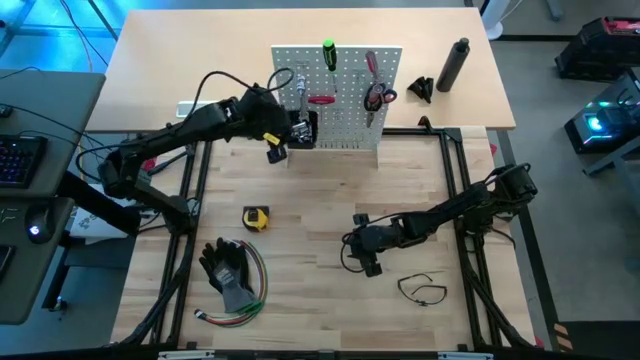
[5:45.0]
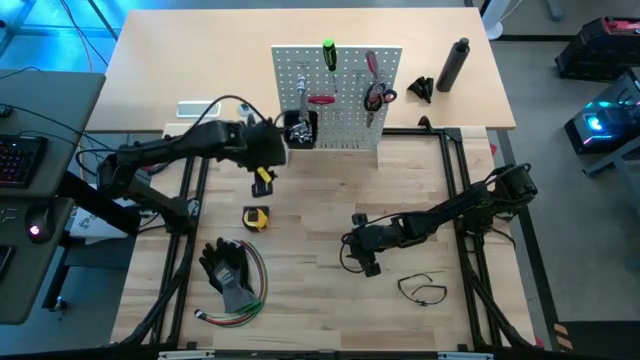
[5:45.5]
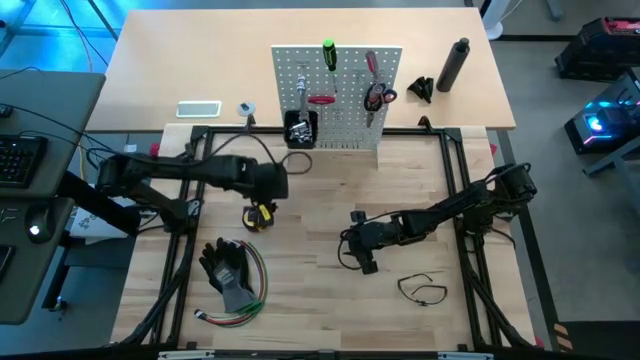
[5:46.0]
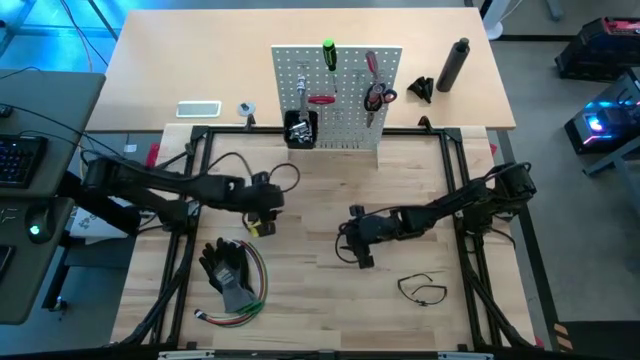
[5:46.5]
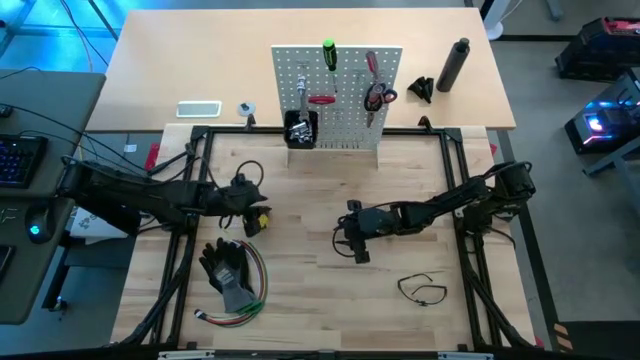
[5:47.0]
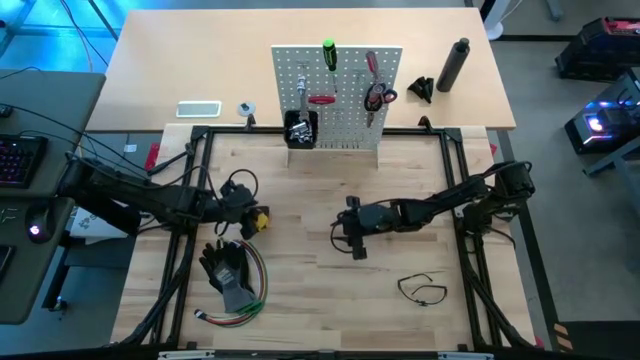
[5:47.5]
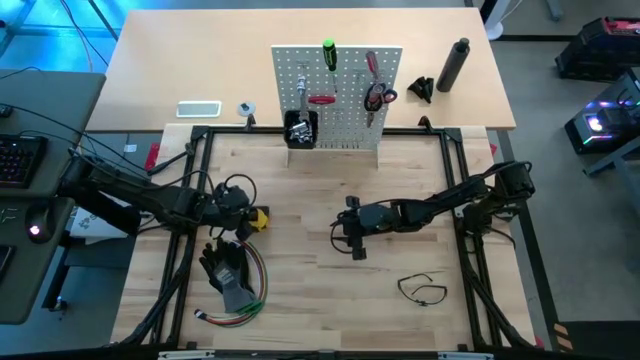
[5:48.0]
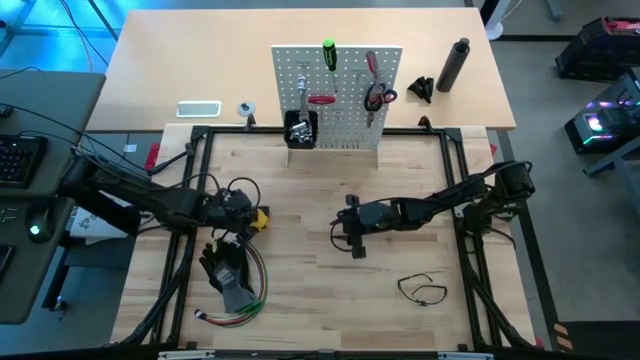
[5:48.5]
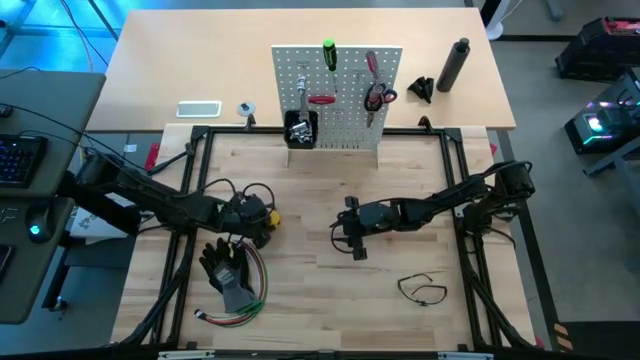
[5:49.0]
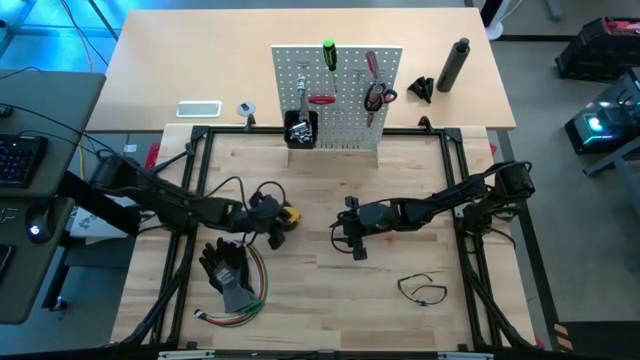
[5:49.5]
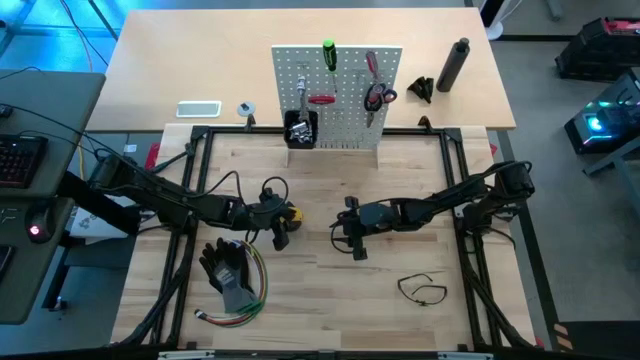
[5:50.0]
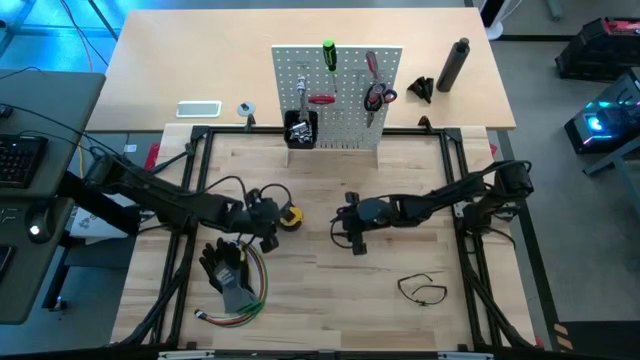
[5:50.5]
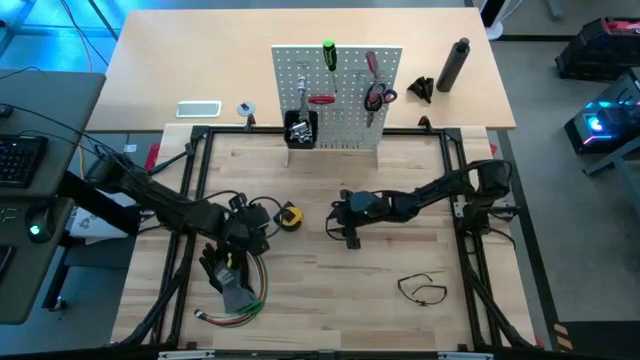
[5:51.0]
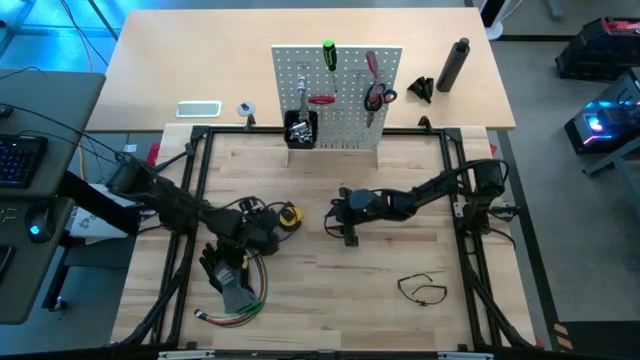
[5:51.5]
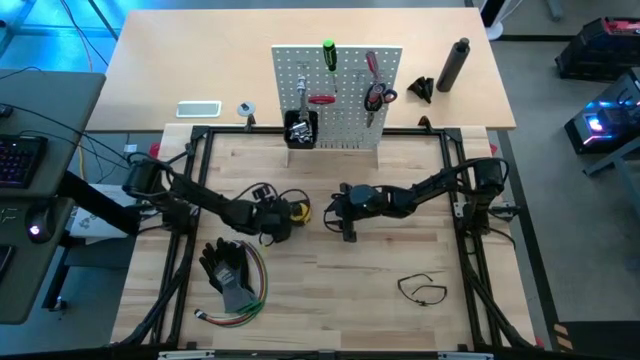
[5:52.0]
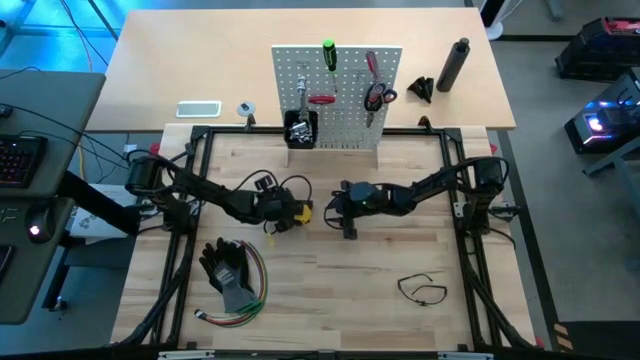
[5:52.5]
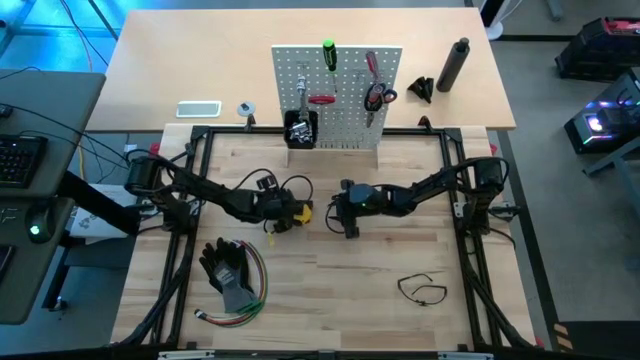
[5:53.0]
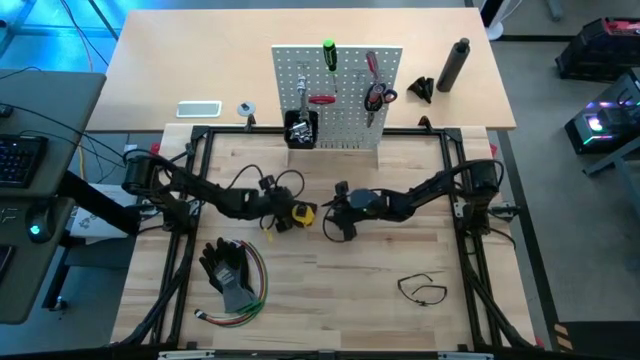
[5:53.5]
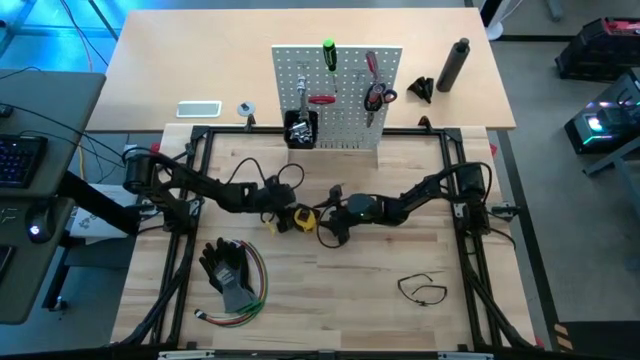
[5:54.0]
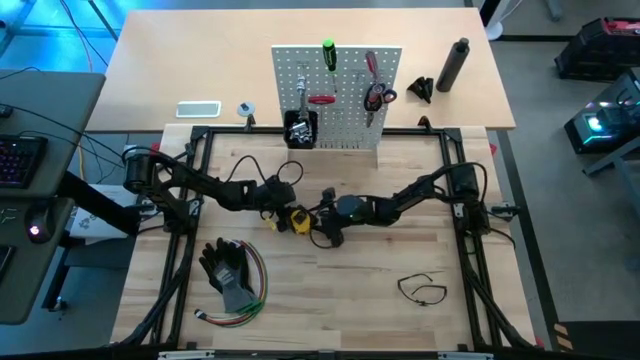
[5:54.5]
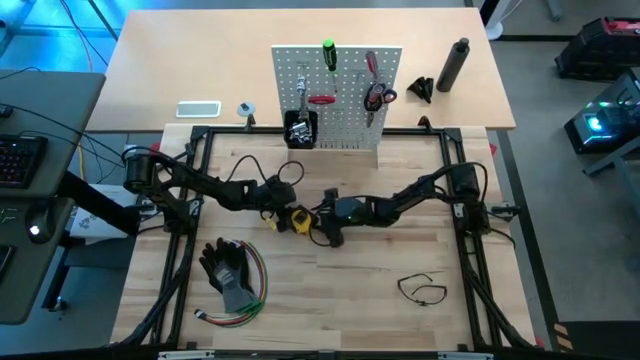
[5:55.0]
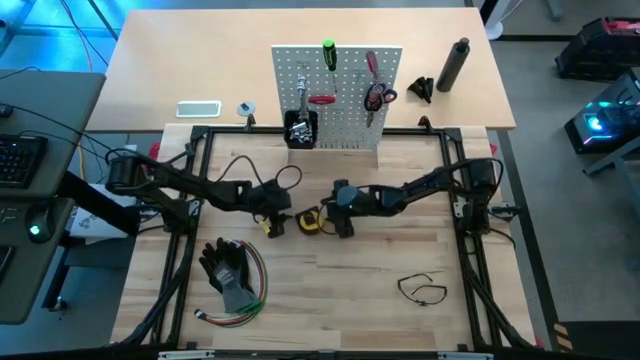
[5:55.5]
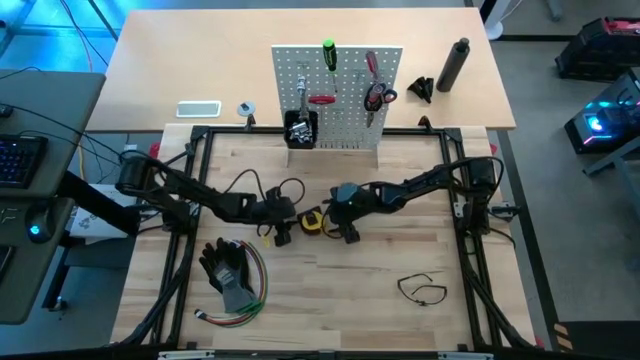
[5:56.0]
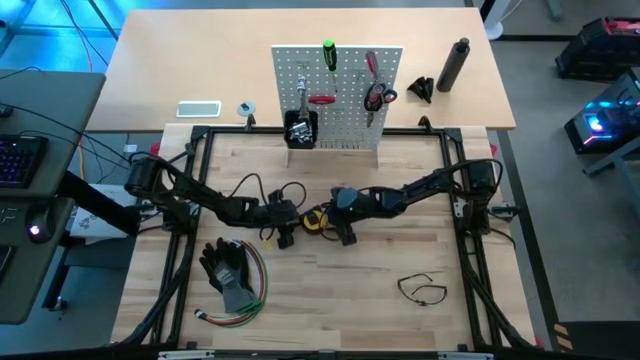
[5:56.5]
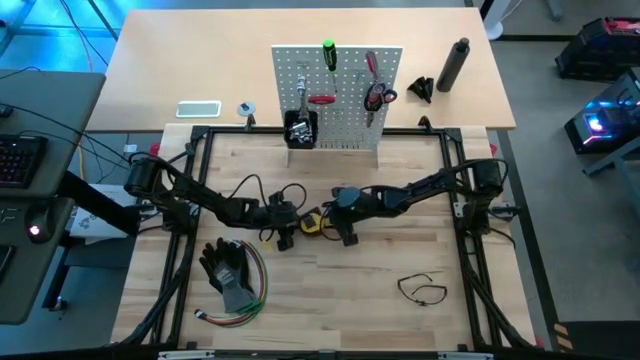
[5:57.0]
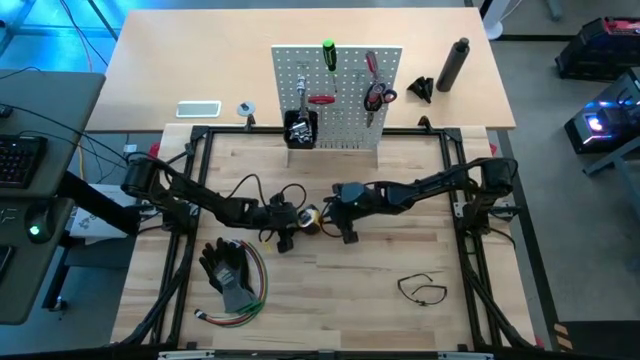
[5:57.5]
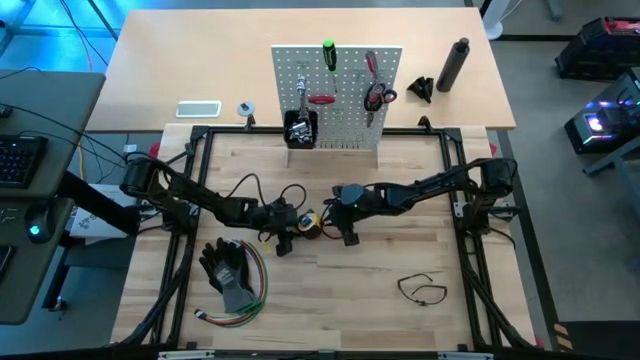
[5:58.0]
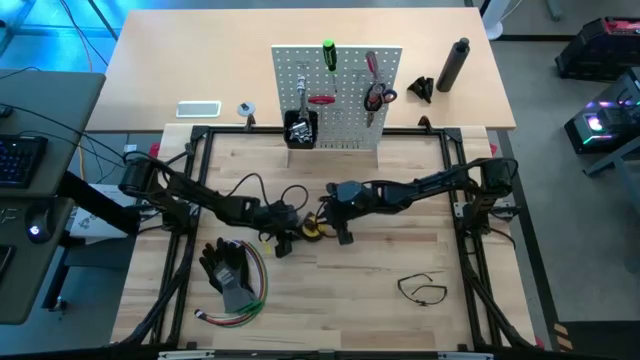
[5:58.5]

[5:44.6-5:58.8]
Task: Hang tools onto peg board
Hang the yellow tape measure on the black bin on the white peg board

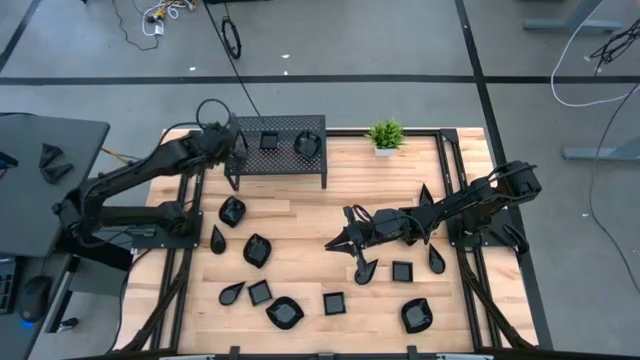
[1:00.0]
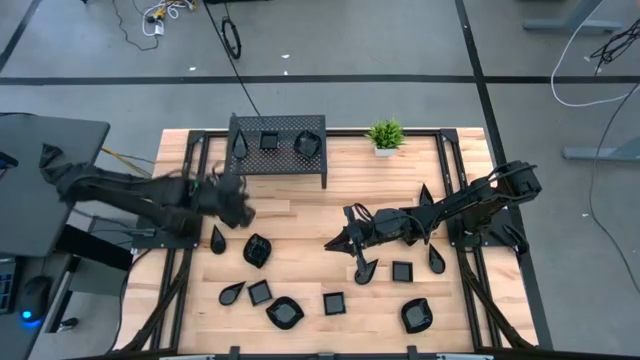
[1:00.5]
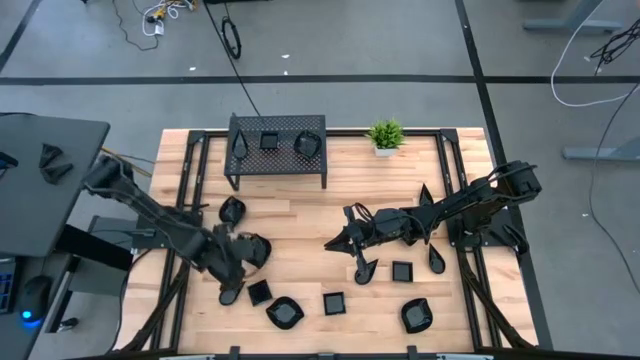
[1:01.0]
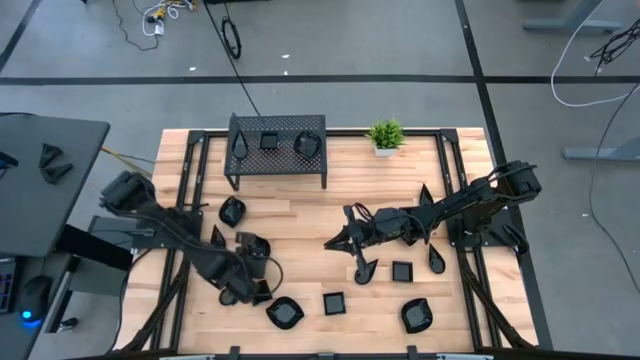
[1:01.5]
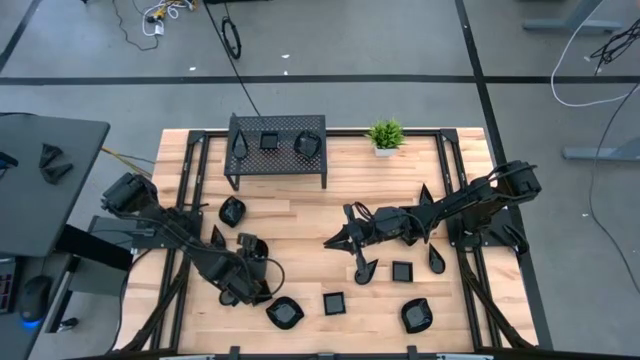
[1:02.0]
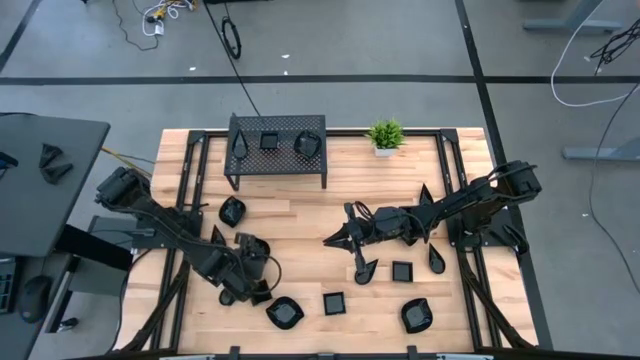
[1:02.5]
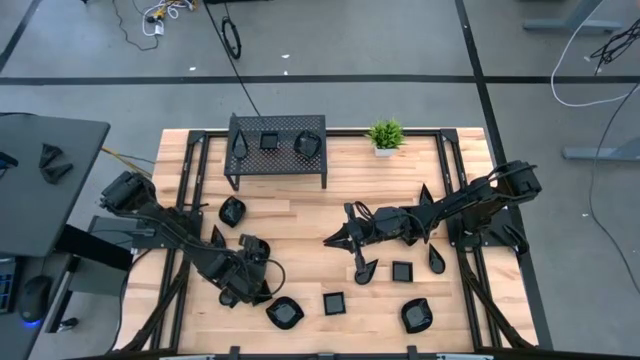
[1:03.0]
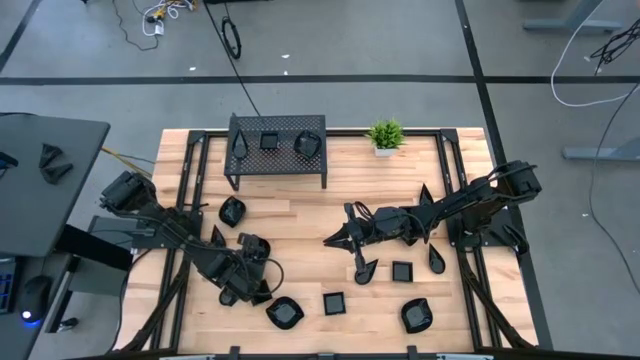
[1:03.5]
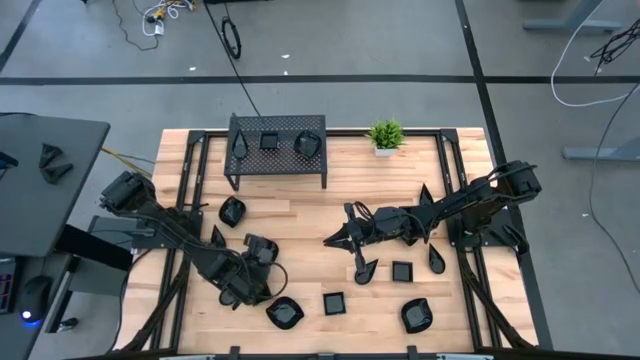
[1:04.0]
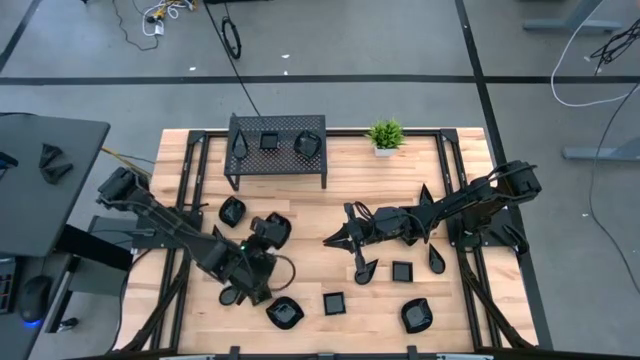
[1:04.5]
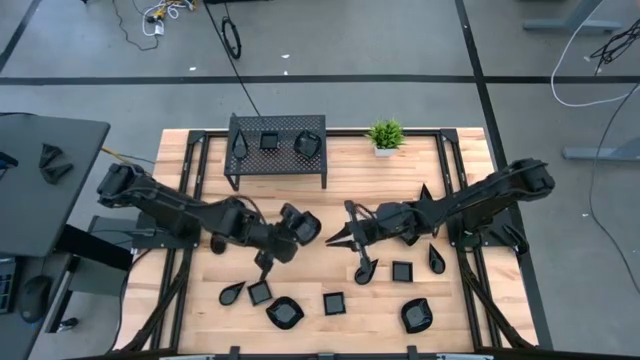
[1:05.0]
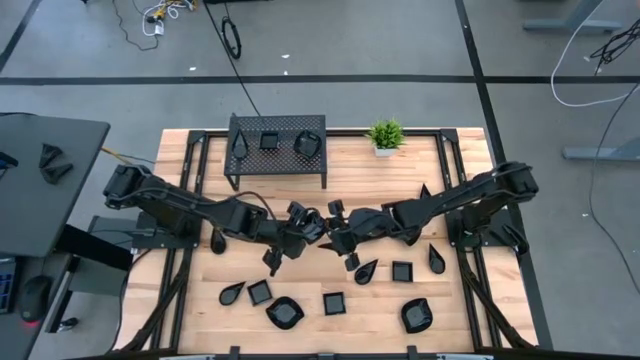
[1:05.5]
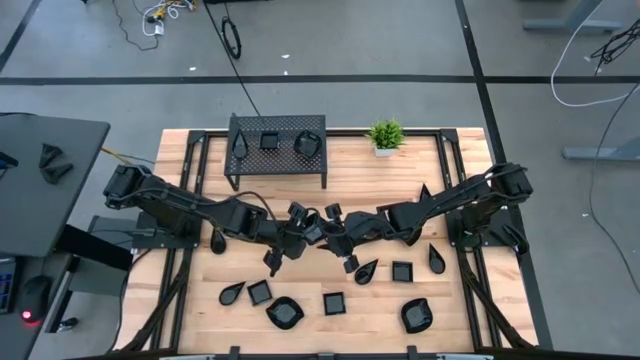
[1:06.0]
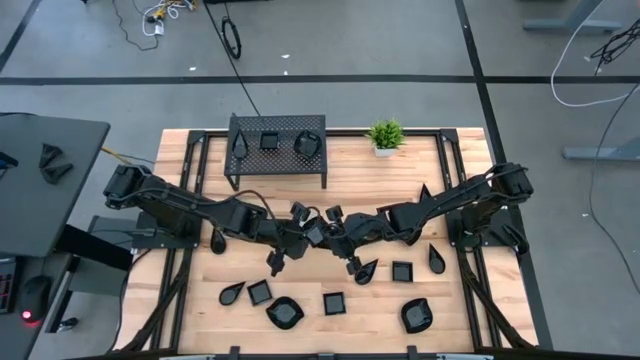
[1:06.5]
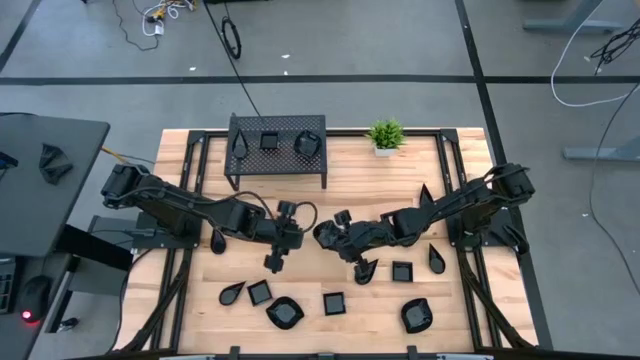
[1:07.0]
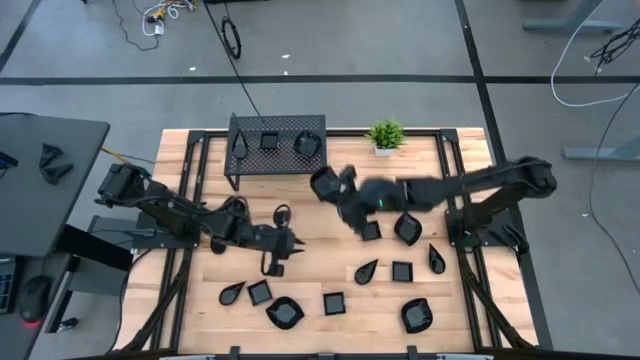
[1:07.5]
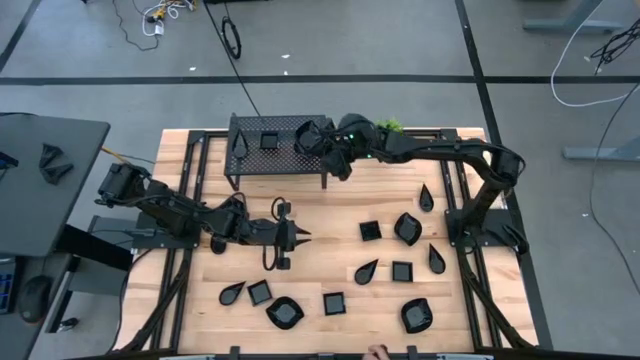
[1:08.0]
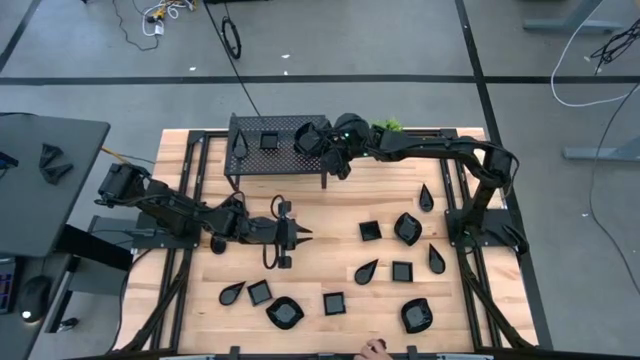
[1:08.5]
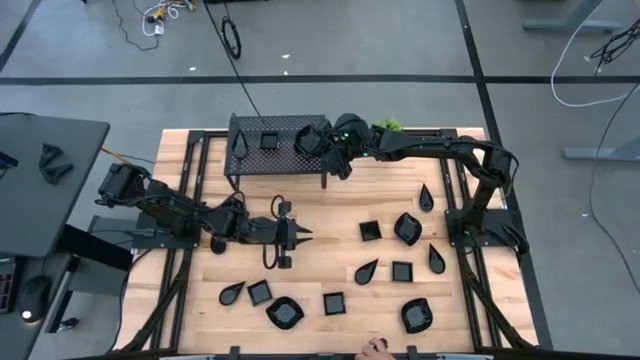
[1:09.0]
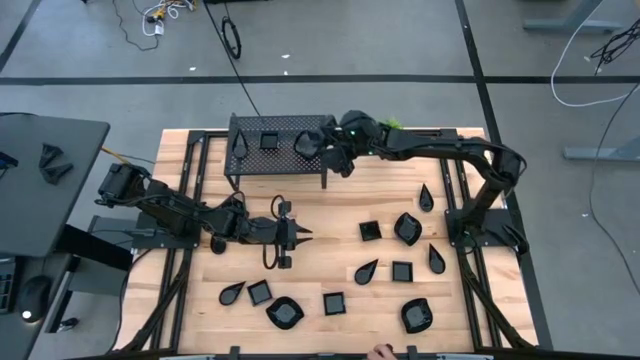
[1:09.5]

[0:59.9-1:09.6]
Task: Pick & Place Mini shaped plates
Stack the black leaf shaped plate on top of the black leaf shaped plates on the shelf
